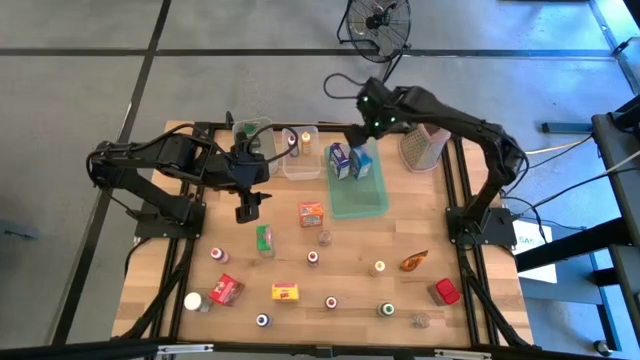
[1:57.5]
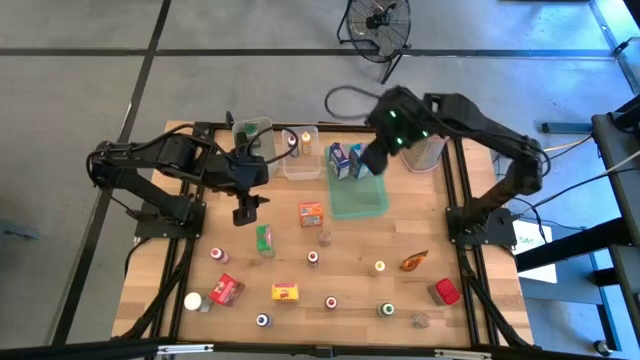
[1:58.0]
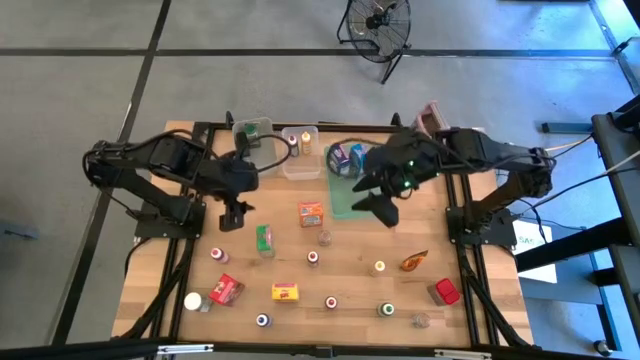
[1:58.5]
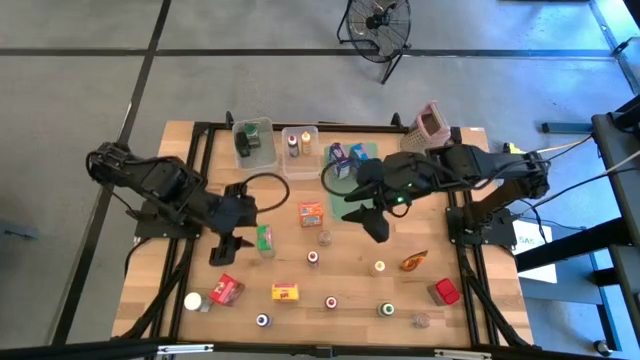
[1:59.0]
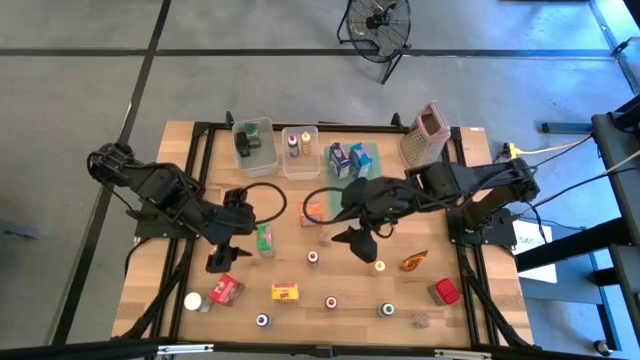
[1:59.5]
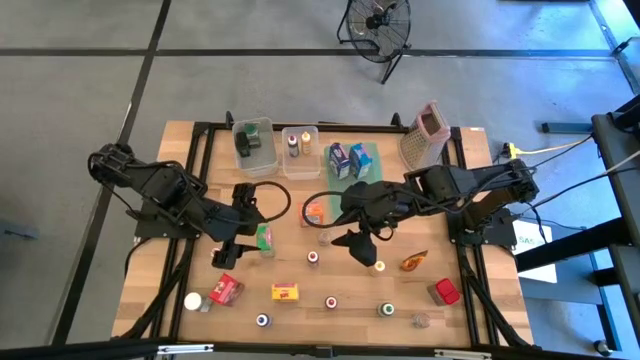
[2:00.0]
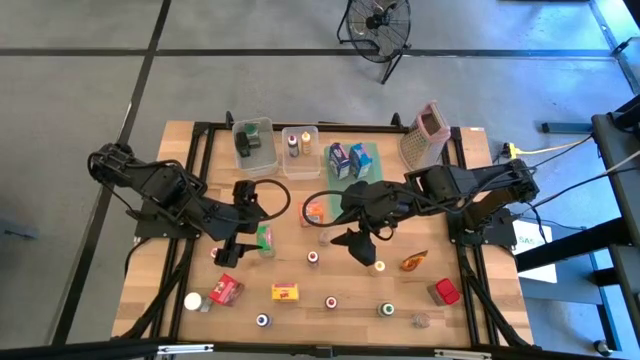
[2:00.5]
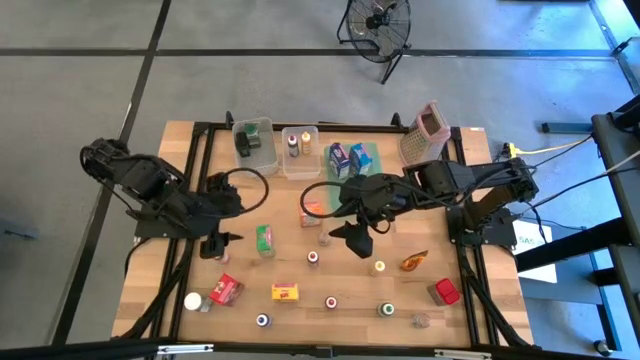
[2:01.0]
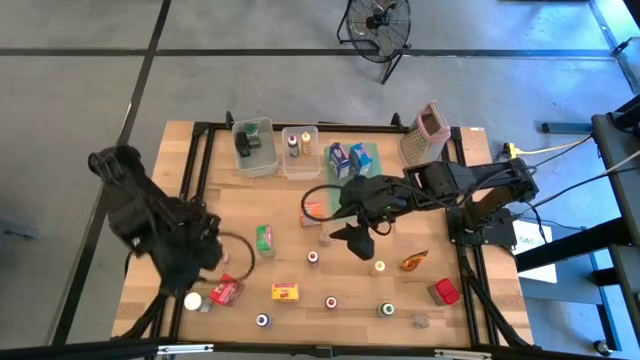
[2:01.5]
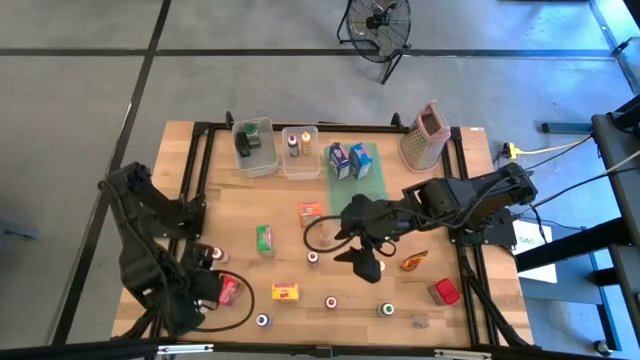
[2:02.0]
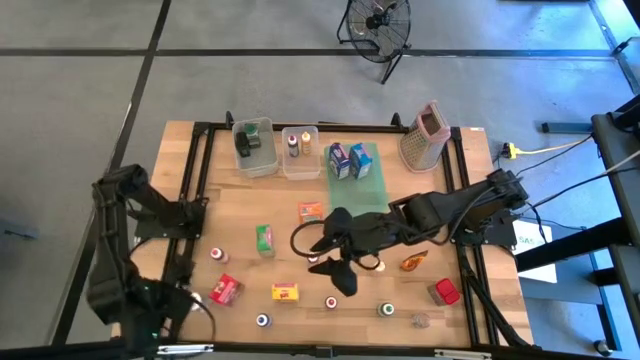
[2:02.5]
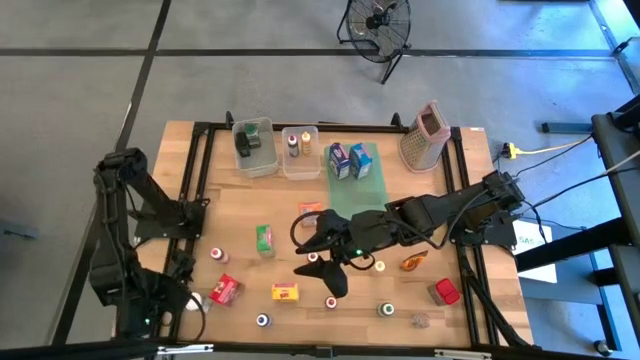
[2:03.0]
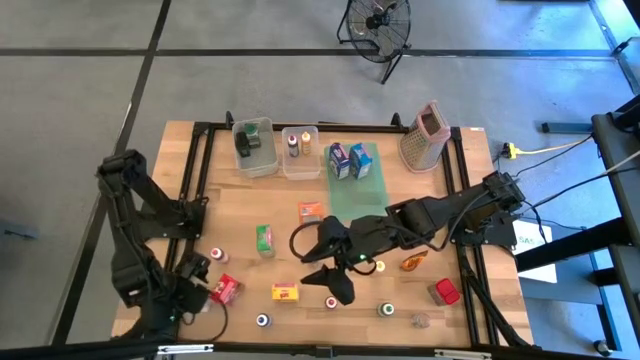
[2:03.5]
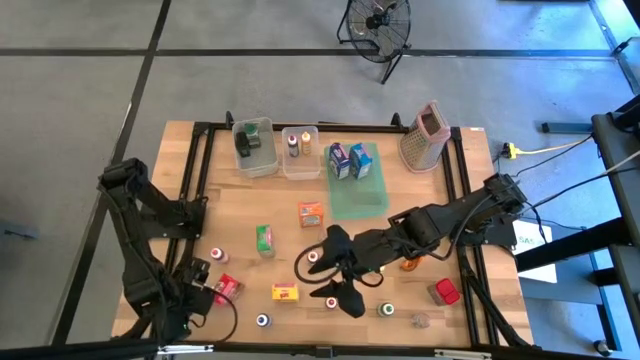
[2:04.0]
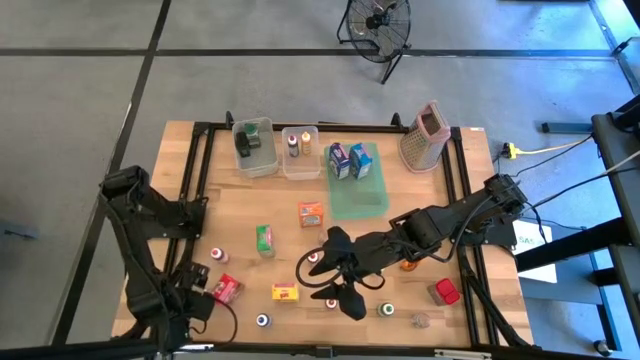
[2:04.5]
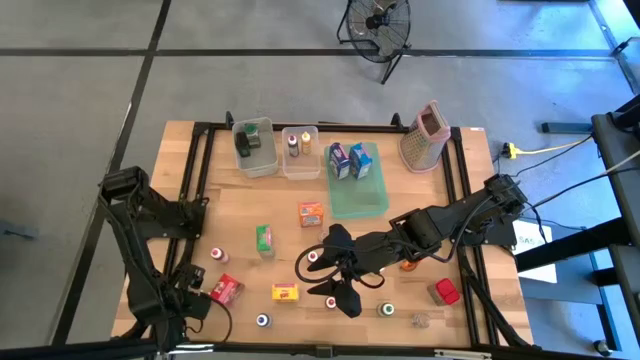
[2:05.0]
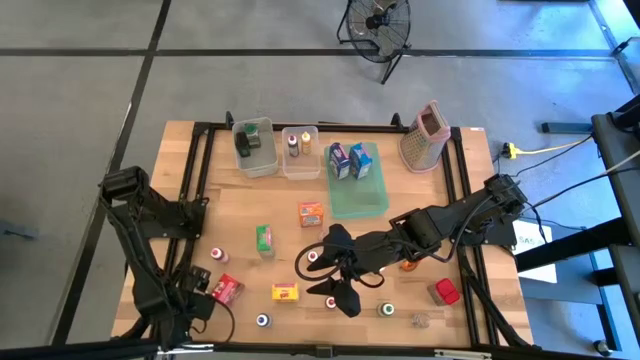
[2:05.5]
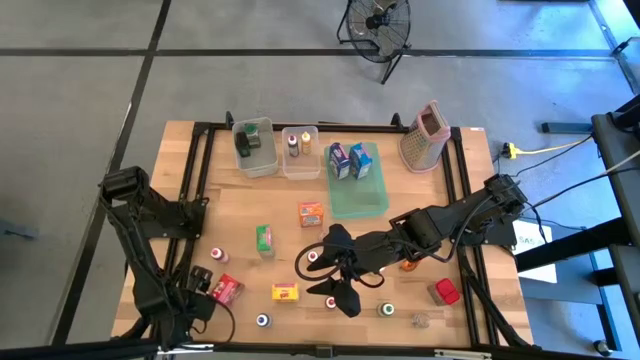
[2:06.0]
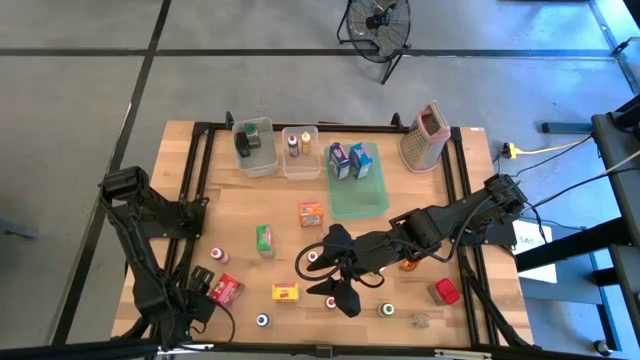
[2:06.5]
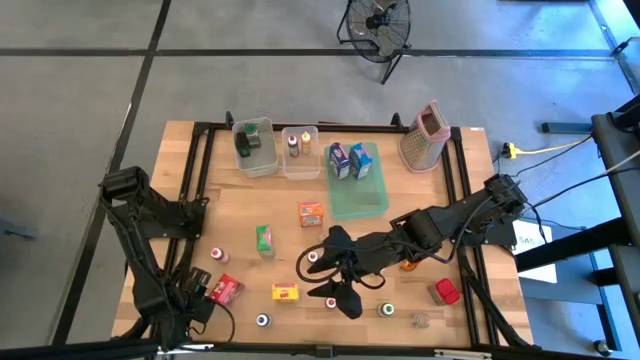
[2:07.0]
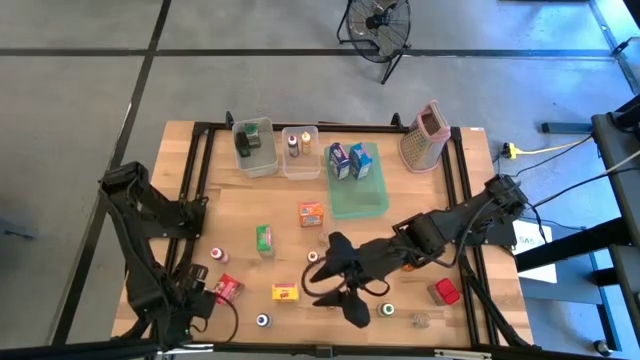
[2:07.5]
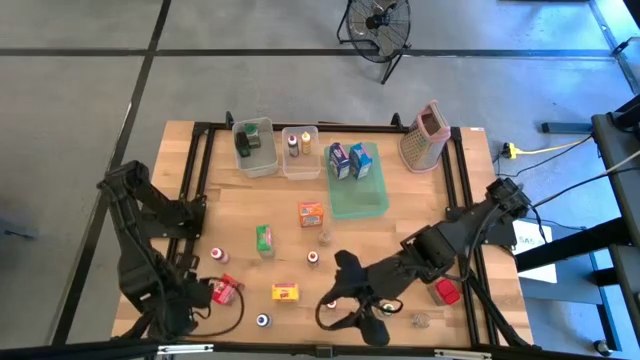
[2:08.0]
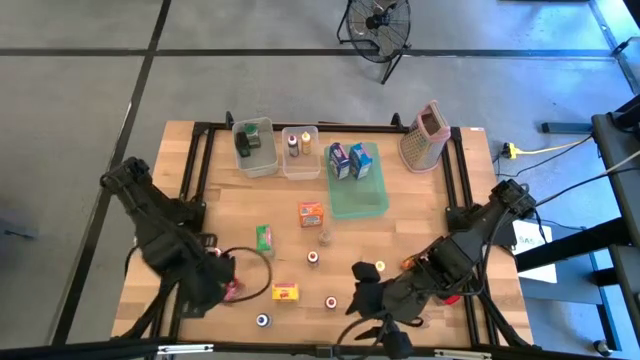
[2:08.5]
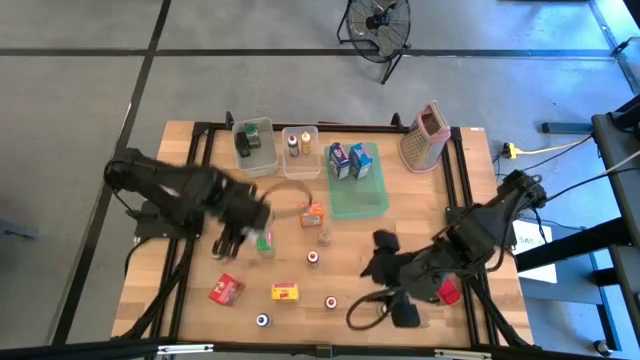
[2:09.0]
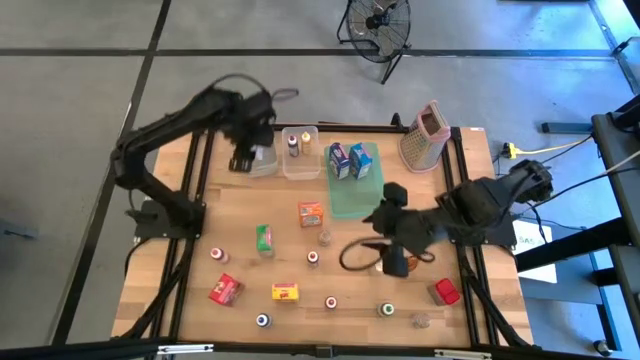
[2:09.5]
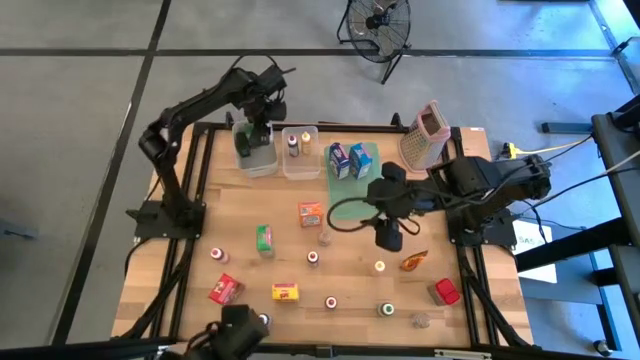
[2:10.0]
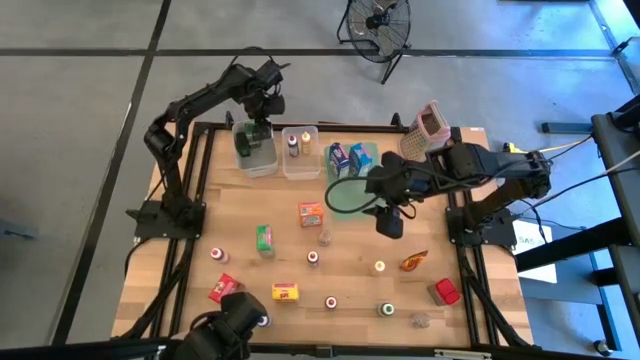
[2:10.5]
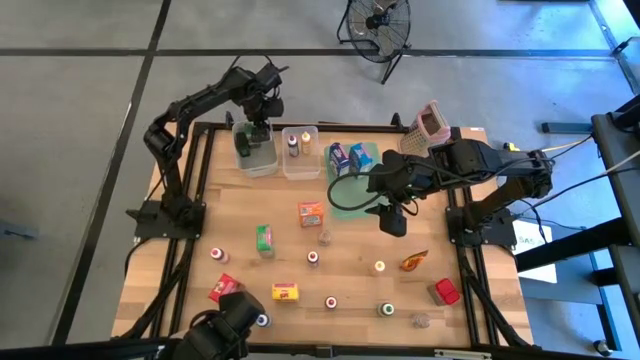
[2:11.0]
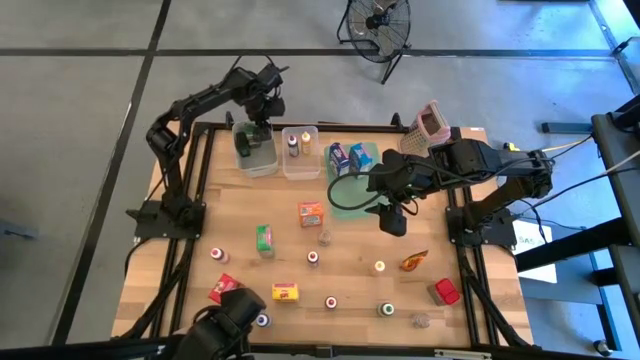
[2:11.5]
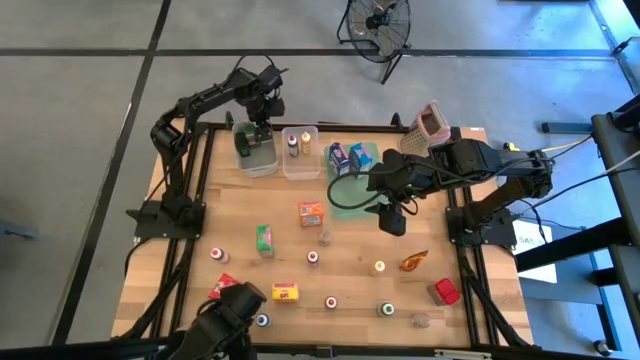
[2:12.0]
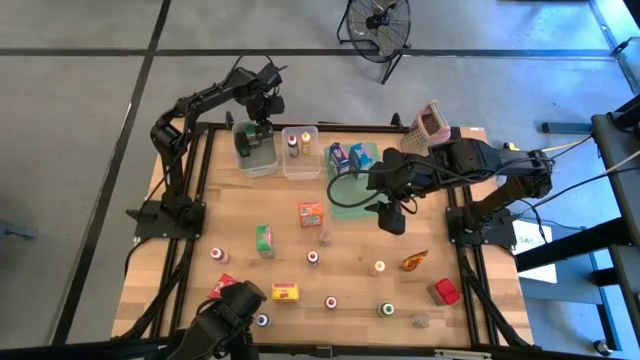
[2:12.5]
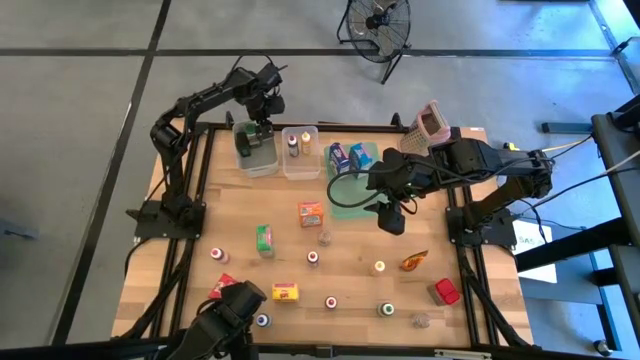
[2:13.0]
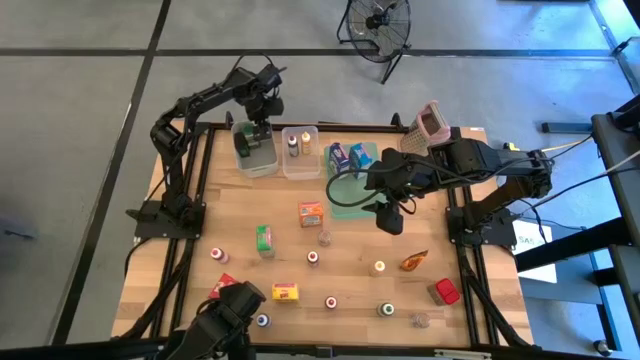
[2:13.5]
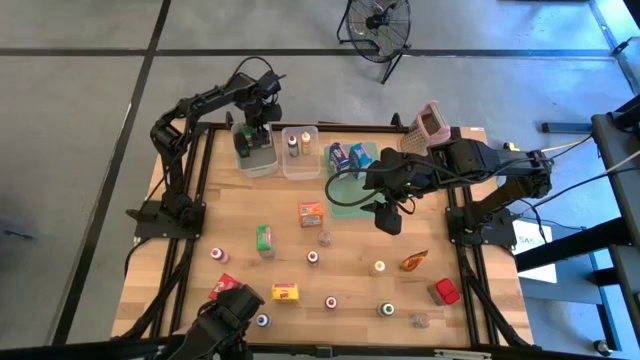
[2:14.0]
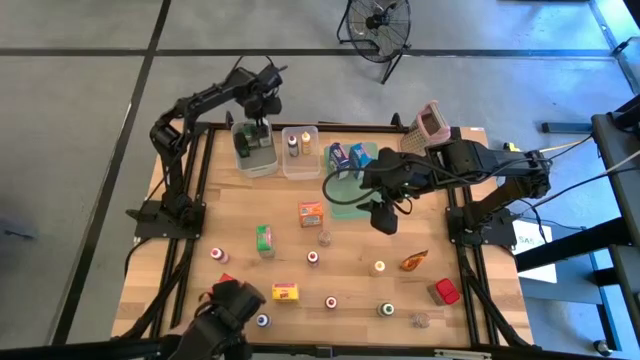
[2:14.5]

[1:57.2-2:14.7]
Task: Pick & Place Kitchen Items
Put the white spice bottle into the gray bin

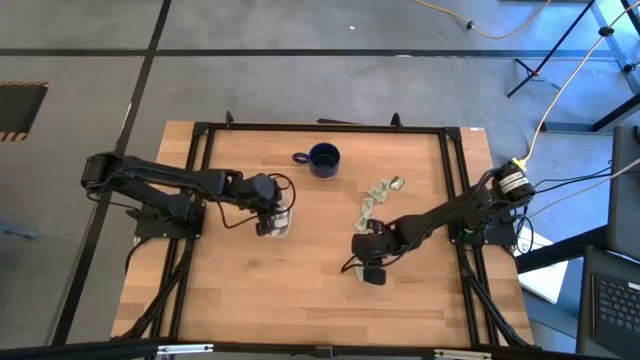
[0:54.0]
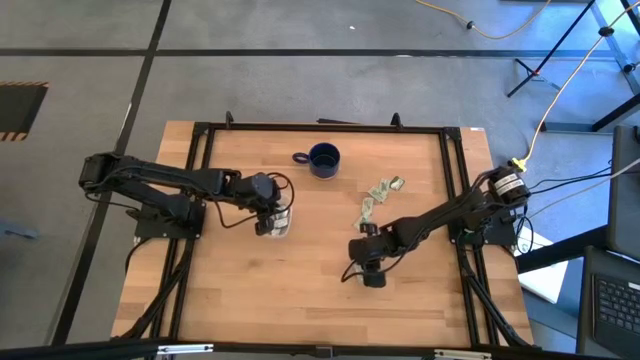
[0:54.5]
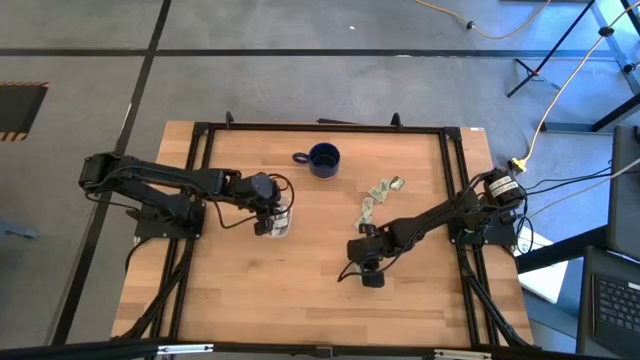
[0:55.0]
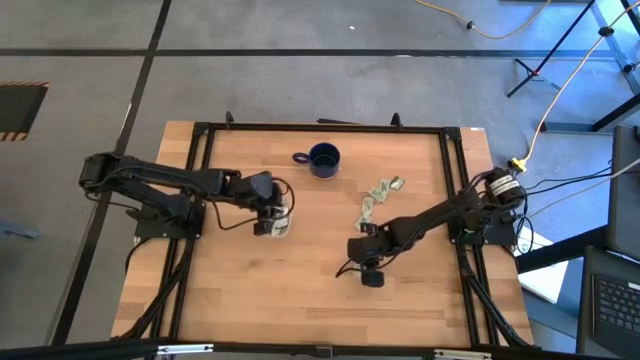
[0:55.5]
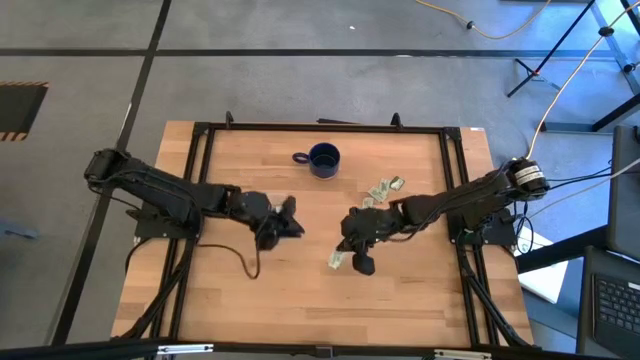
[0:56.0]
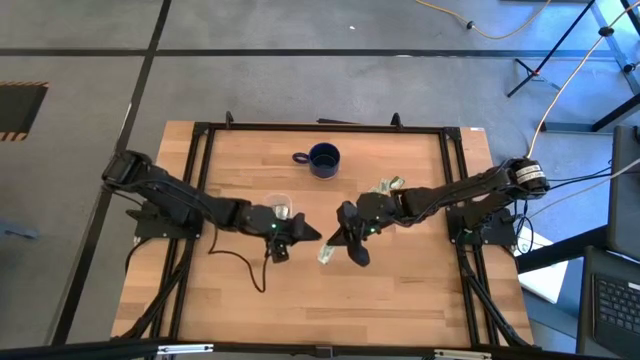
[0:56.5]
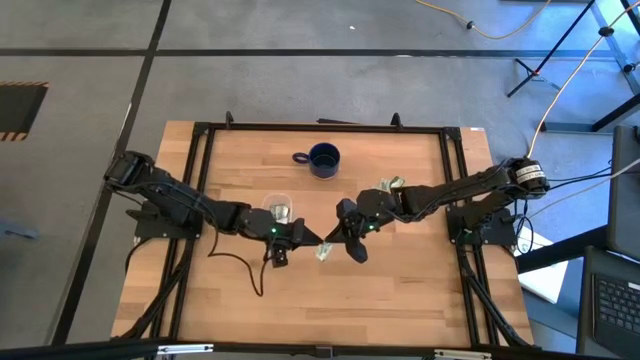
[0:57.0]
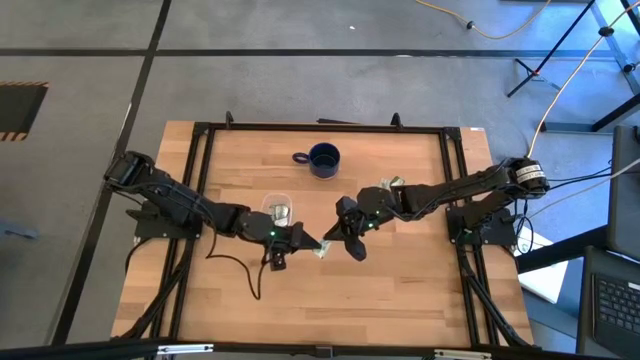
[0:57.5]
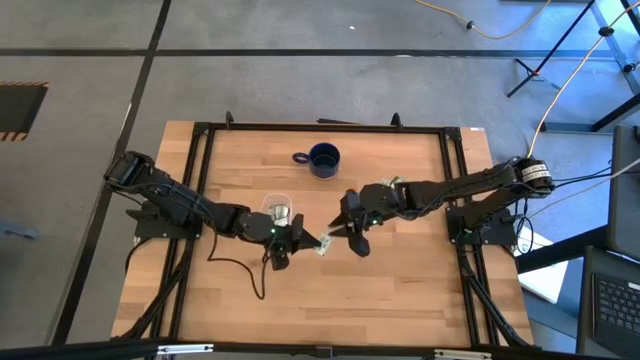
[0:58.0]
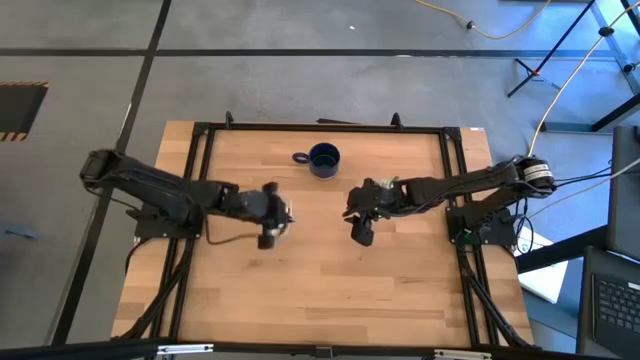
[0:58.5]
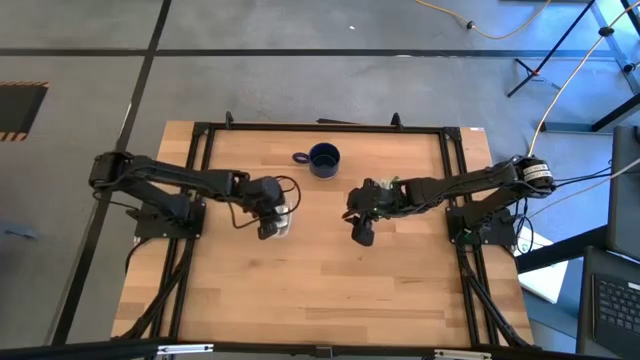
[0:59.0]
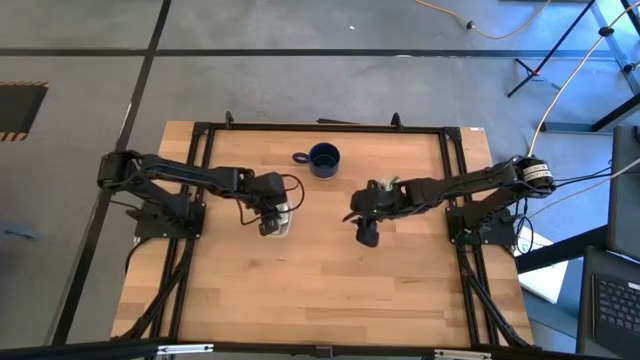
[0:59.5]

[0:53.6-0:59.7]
Task: Pick and place Stevia / Truvia into bins
Put the white stevia packet into the transparent container
